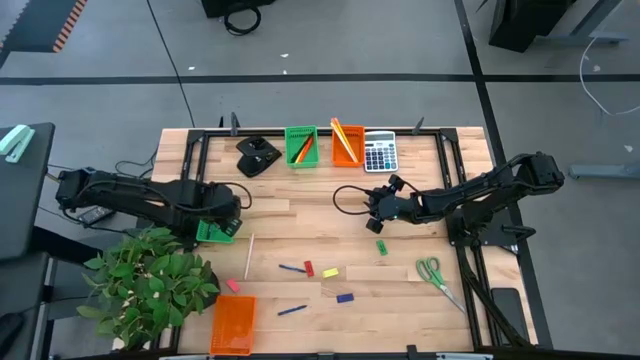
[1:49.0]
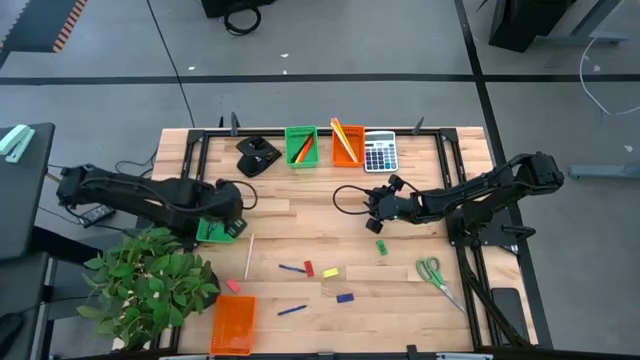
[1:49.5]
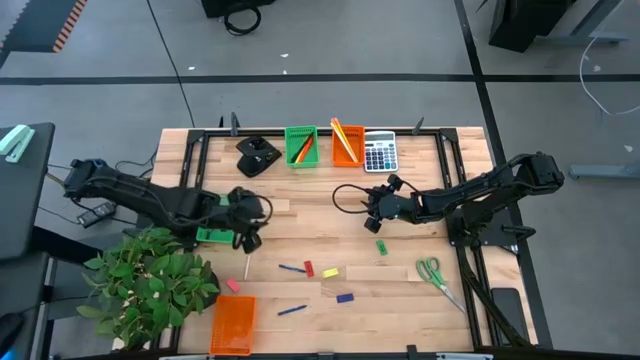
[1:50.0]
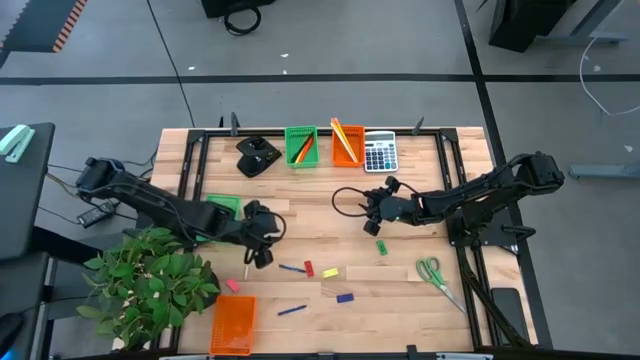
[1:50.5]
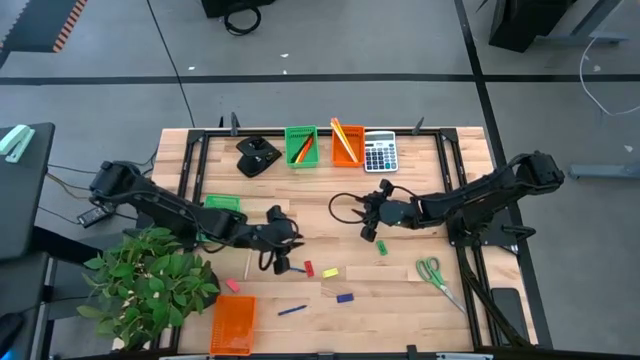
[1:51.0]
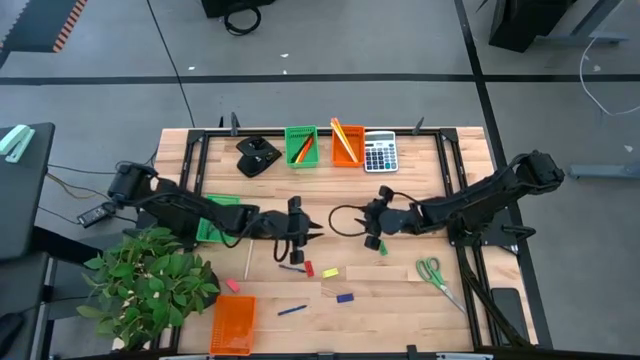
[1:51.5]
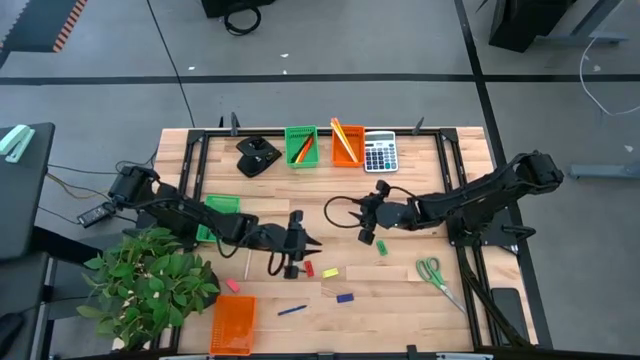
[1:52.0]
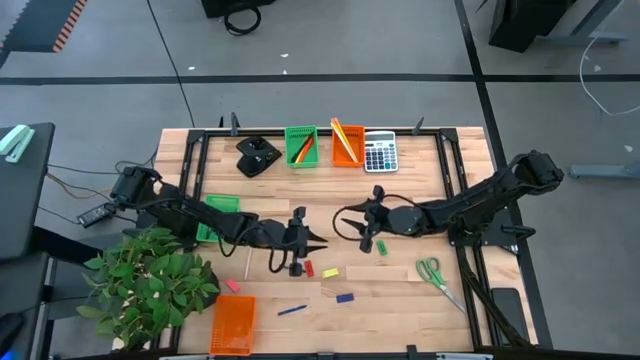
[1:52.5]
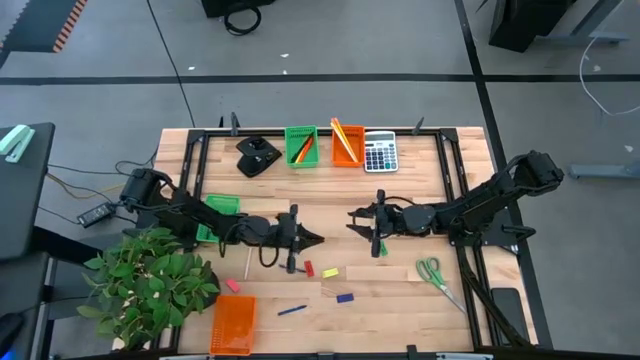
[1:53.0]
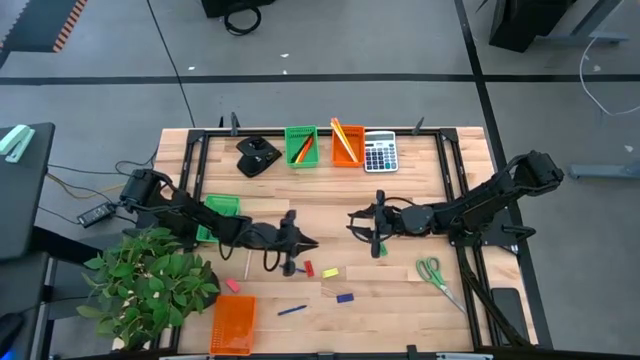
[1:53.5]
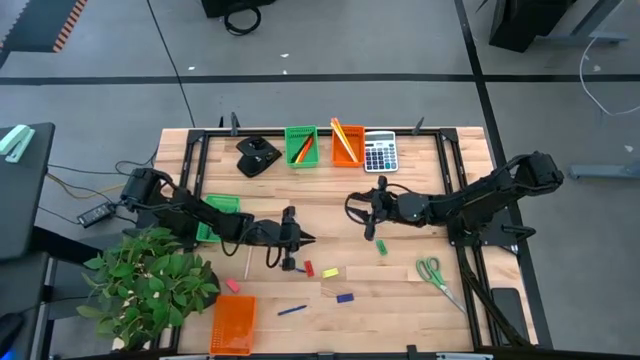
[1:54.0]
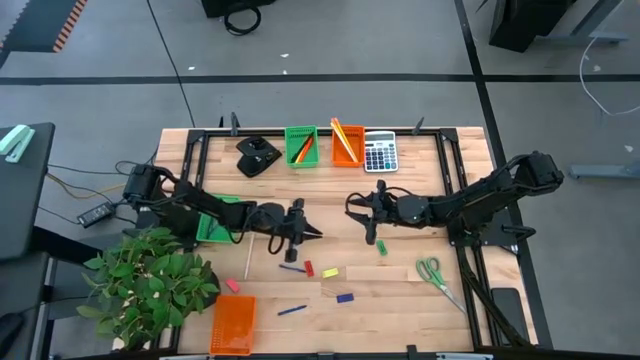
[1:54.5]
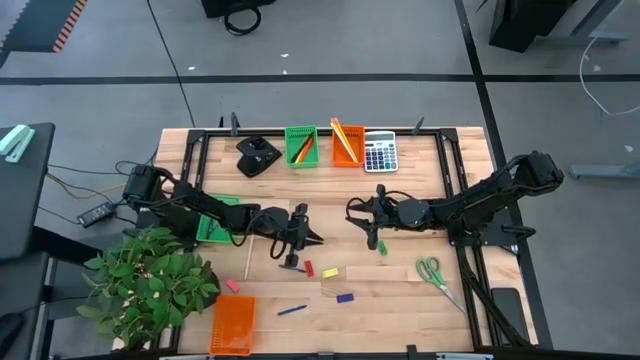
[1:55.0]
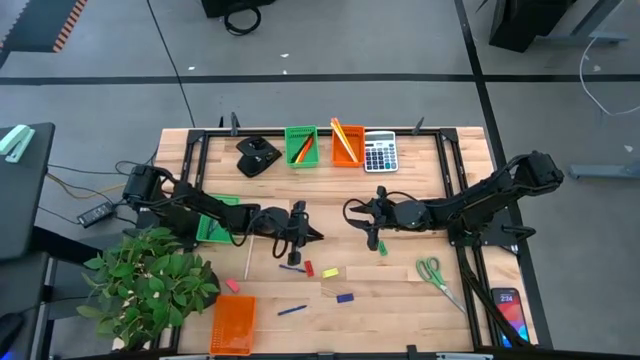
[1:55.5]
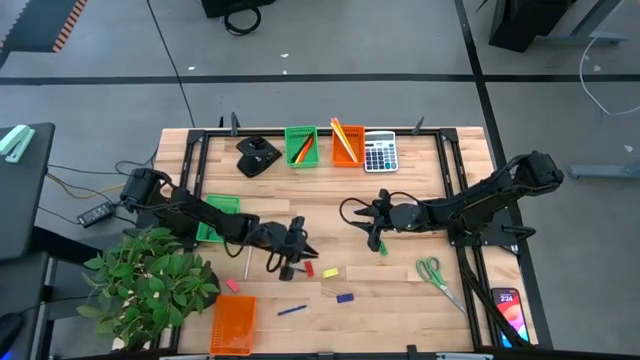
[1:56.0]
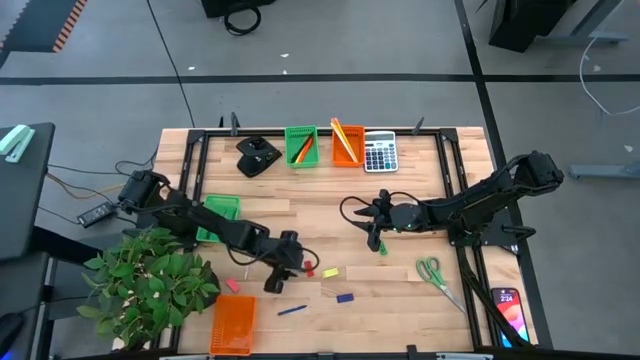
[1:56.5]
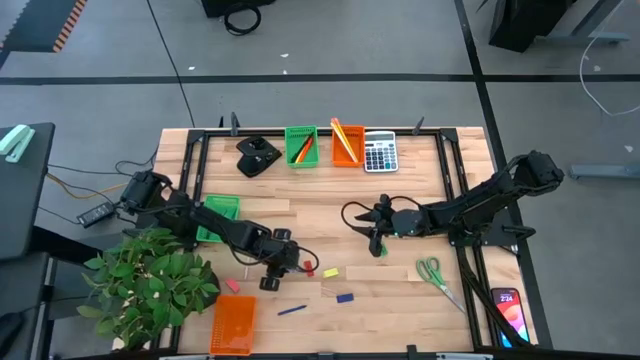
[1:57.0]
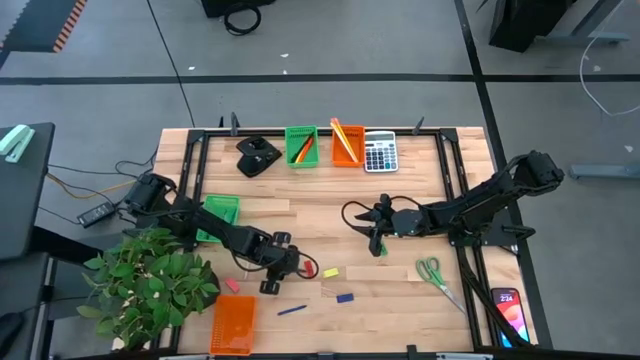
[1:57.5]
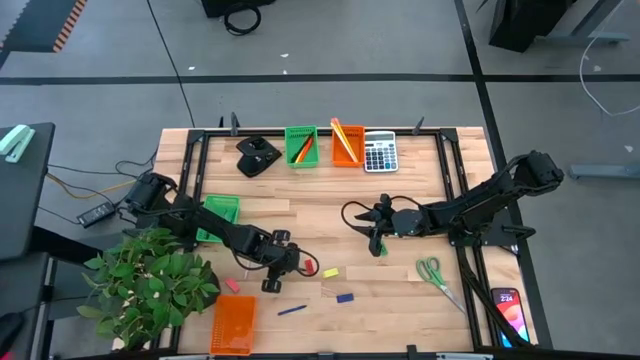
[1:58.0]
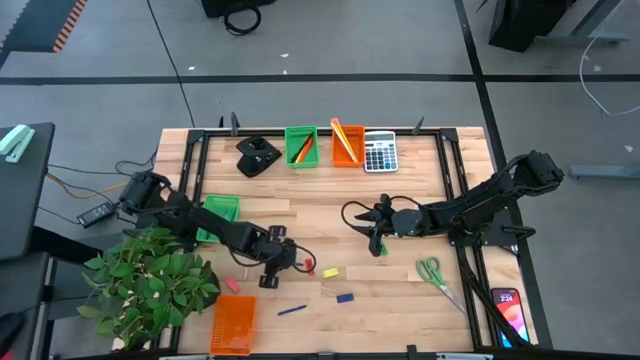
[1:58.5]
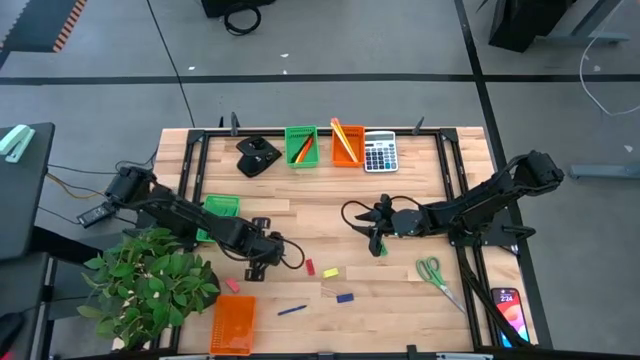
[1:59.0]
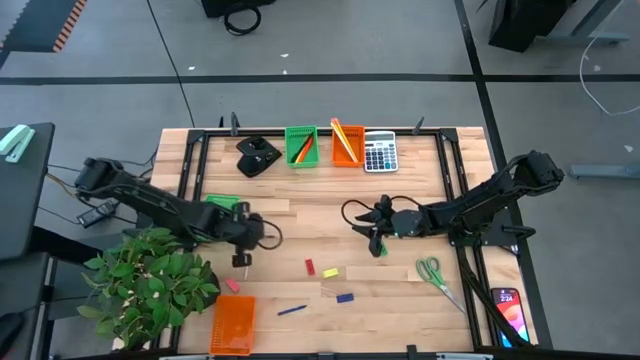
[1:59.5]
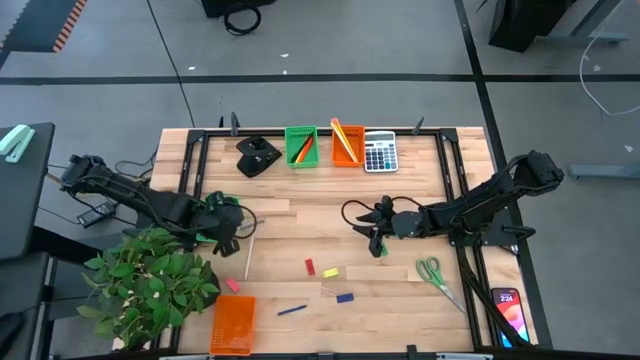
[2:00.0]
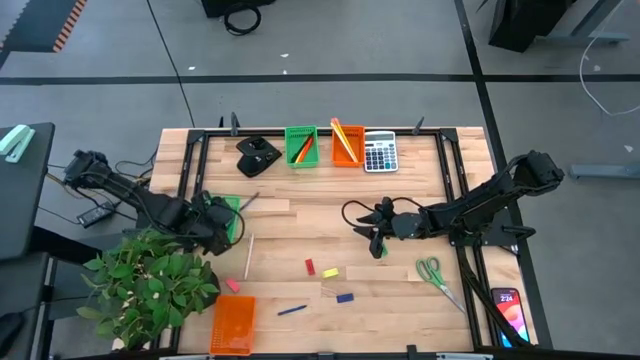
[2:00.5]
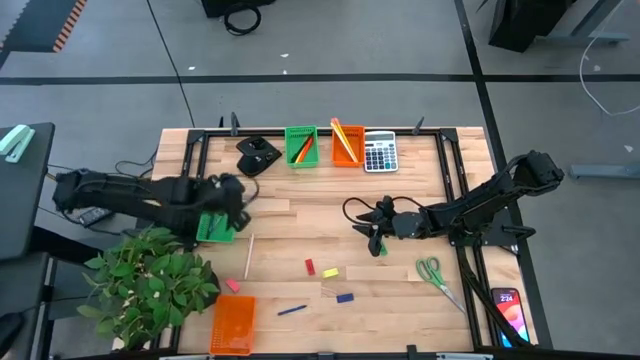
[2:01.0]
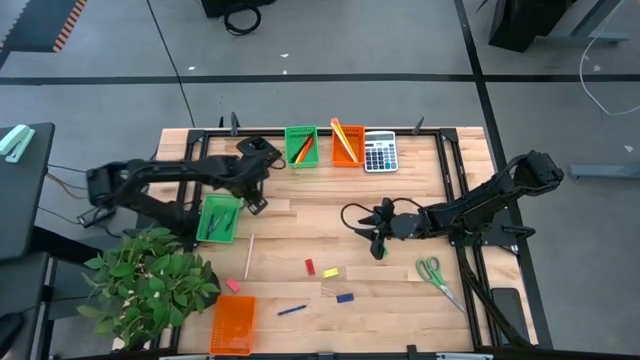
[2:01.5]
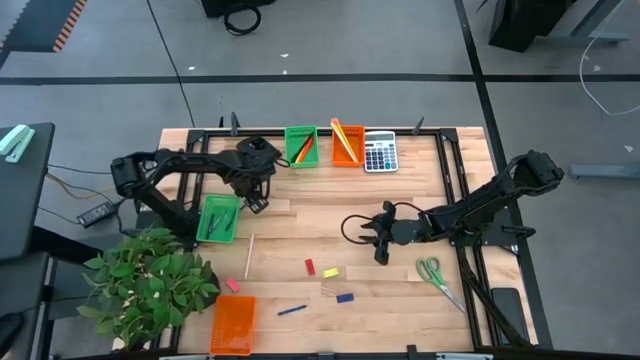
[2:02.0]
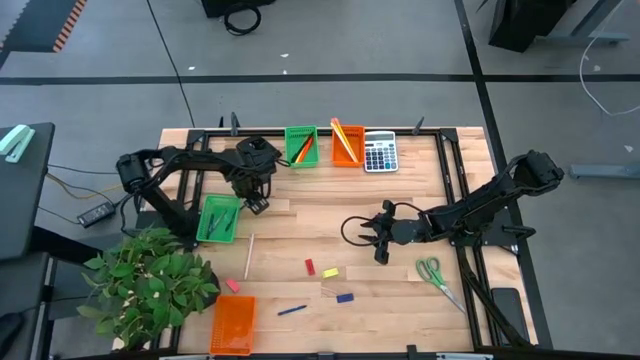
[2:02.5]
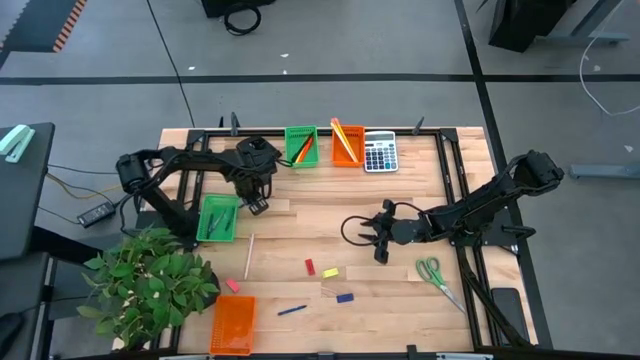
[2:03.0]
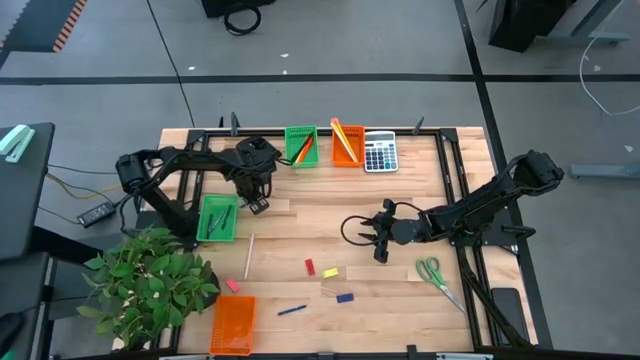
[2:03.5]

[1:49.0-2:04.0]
Task: Sort crayons/erasers/pens/pencils in bins
Put the blue crayon into the bottom green bin

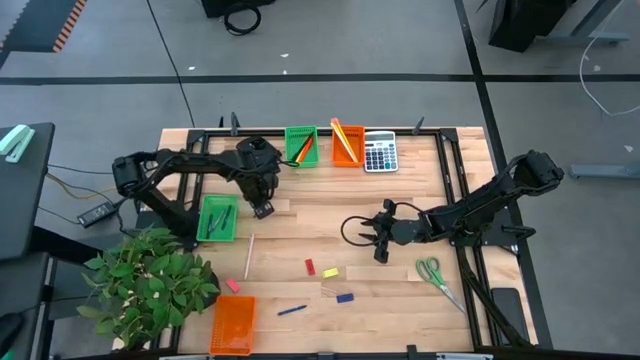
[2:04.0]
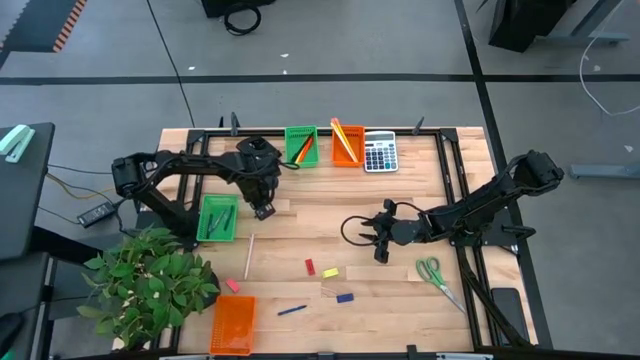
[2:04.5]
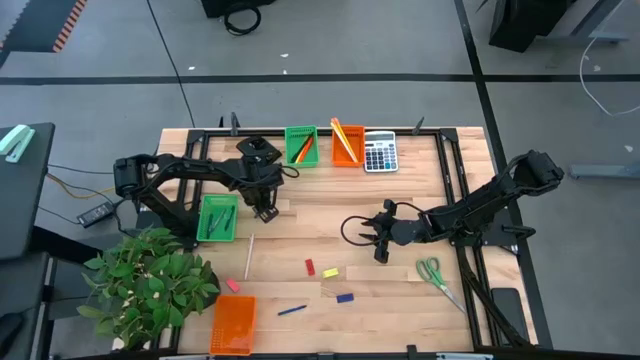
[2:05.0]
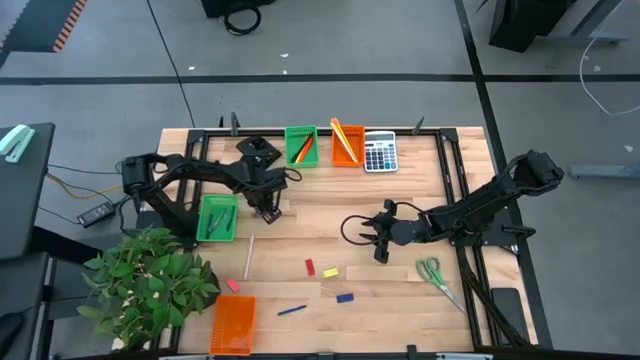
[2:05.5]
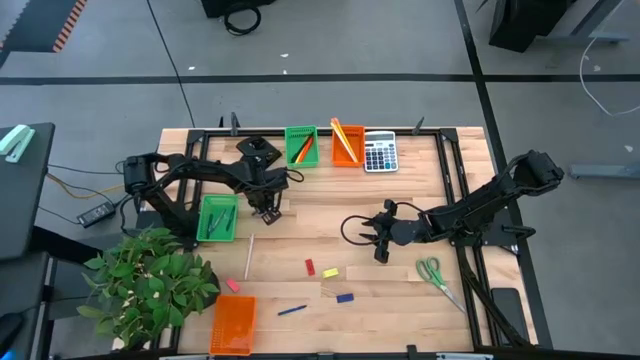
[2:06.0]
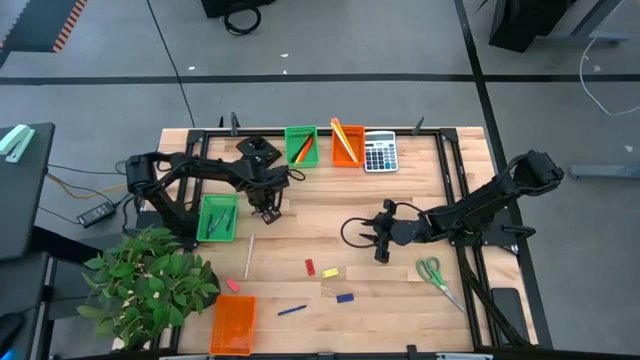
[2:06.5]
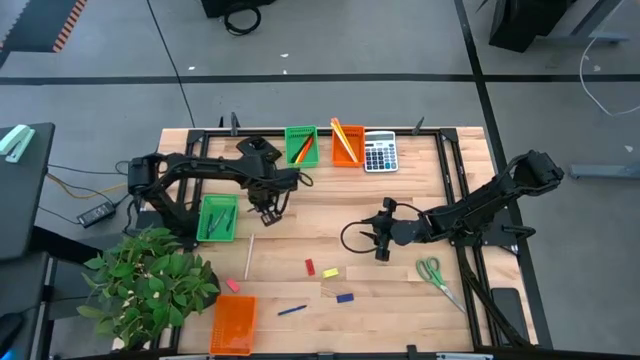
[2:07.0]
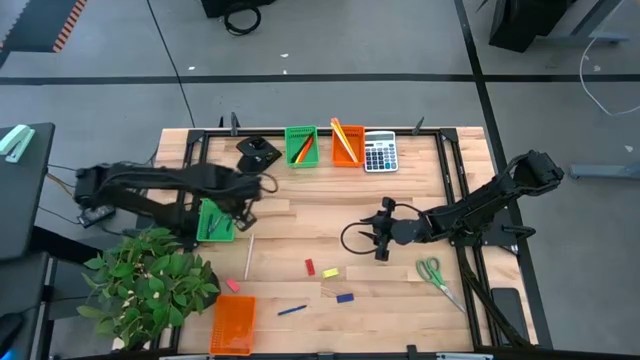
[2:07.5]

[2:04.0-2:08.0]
Put the blue crayon into the bottom green bin
